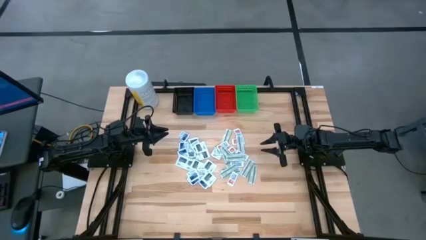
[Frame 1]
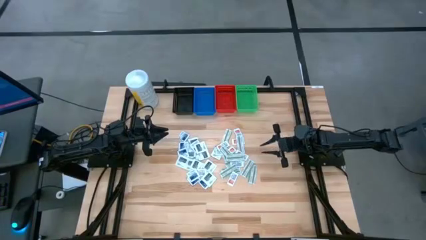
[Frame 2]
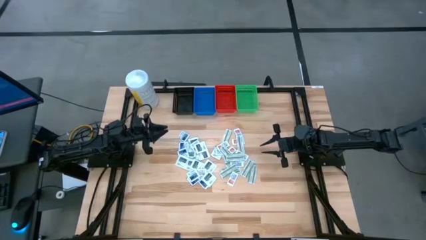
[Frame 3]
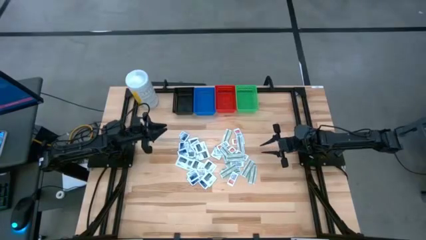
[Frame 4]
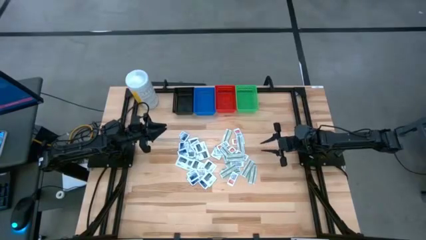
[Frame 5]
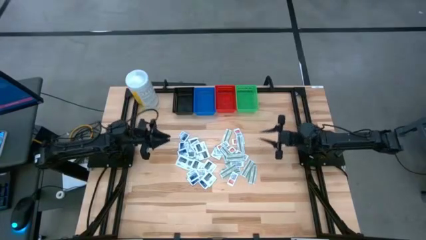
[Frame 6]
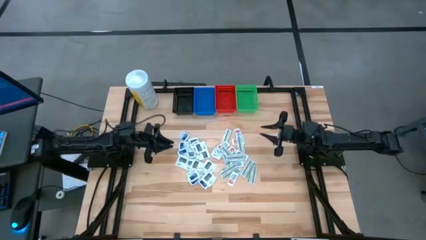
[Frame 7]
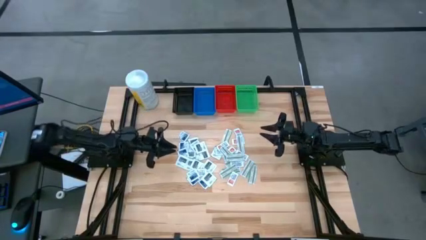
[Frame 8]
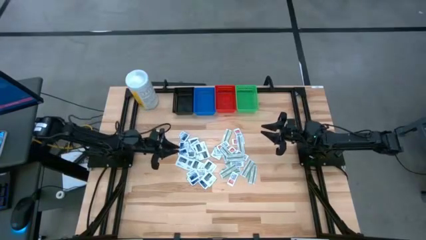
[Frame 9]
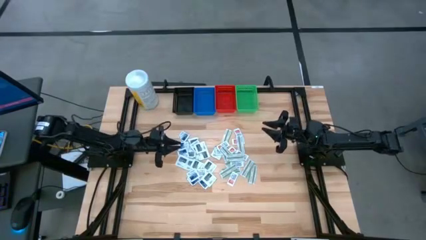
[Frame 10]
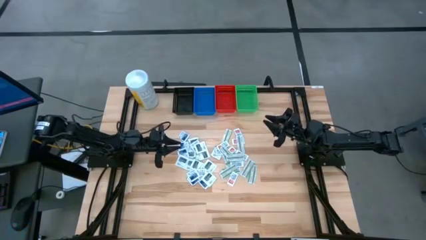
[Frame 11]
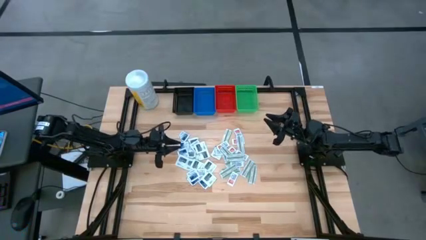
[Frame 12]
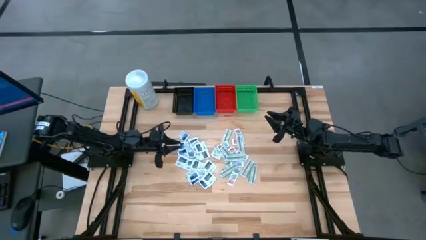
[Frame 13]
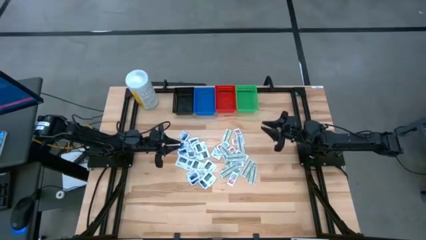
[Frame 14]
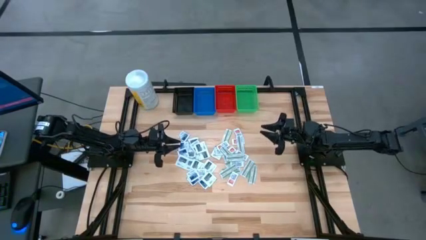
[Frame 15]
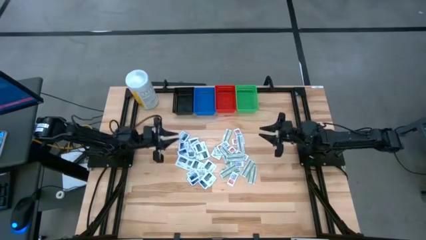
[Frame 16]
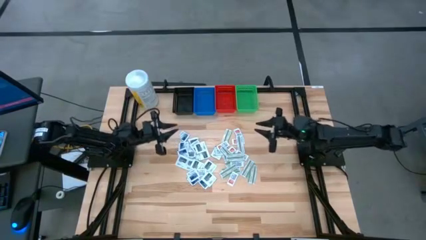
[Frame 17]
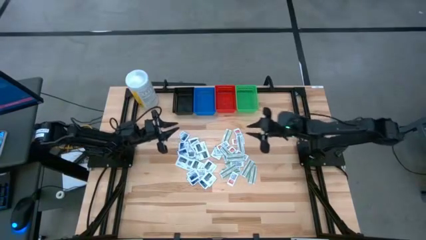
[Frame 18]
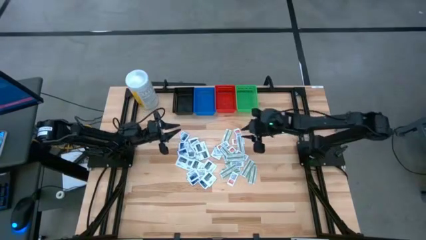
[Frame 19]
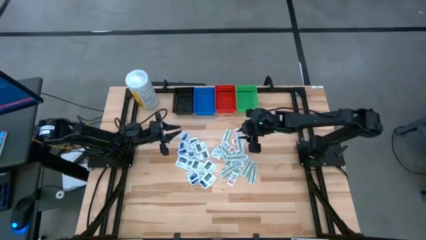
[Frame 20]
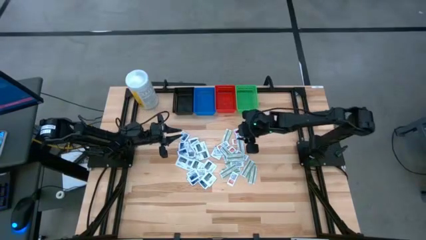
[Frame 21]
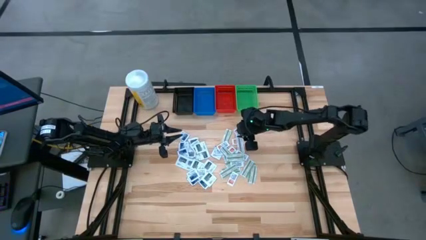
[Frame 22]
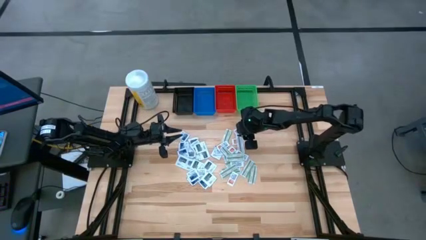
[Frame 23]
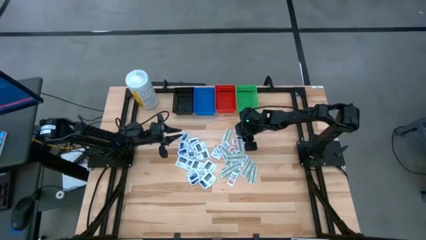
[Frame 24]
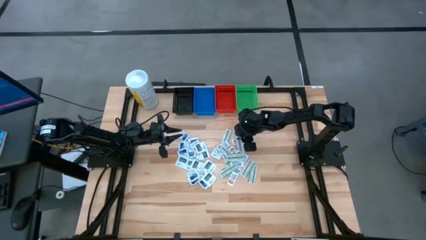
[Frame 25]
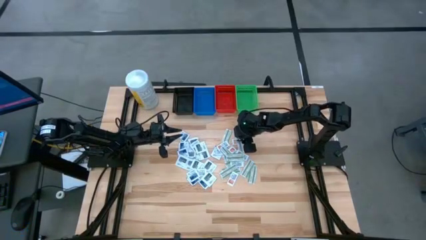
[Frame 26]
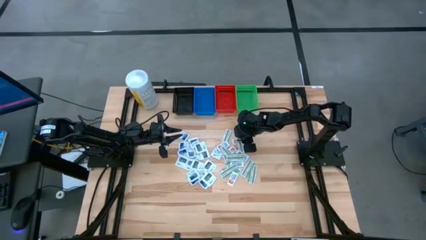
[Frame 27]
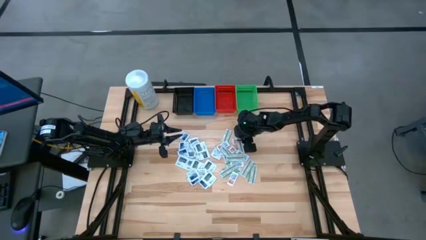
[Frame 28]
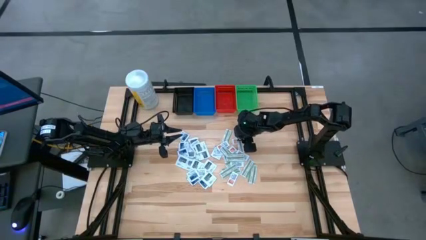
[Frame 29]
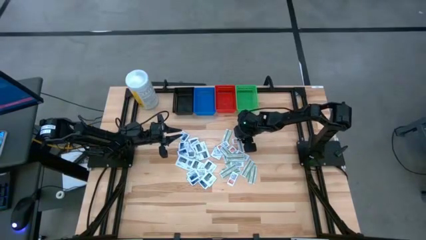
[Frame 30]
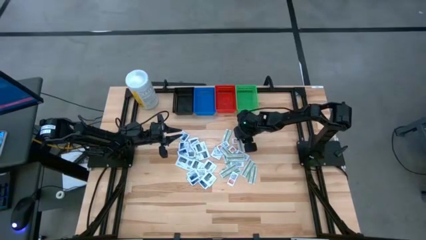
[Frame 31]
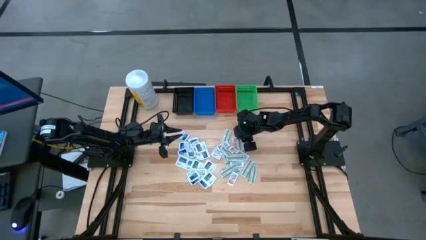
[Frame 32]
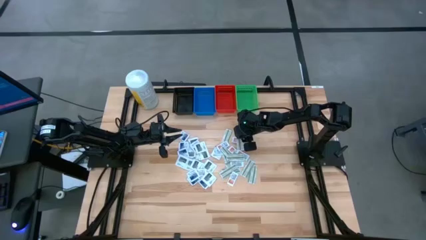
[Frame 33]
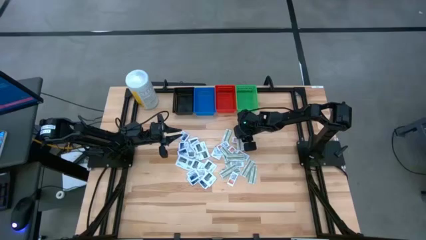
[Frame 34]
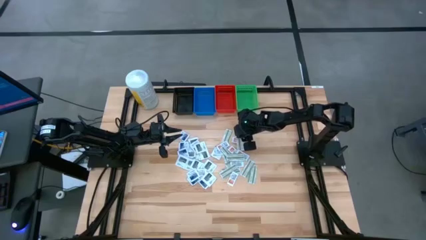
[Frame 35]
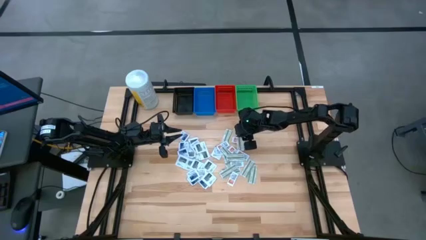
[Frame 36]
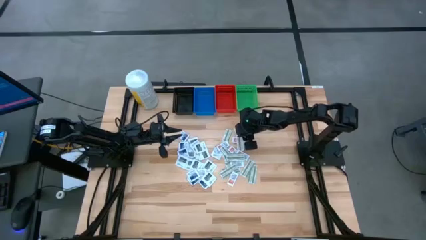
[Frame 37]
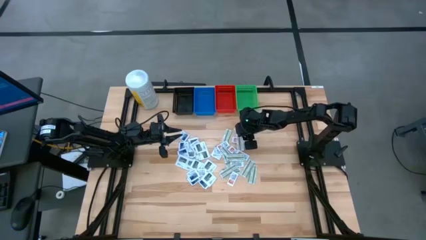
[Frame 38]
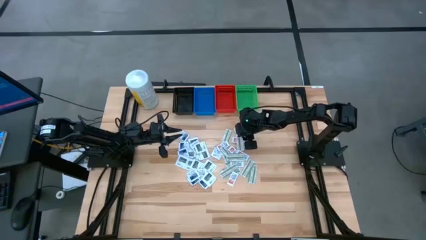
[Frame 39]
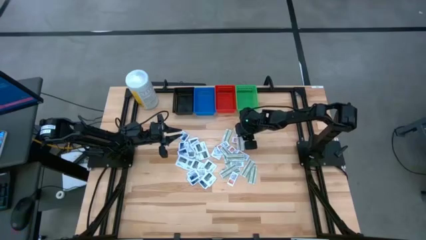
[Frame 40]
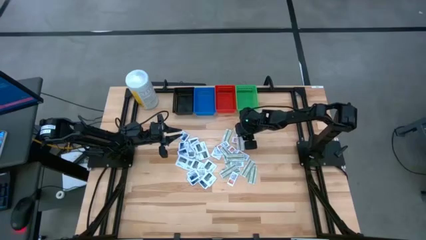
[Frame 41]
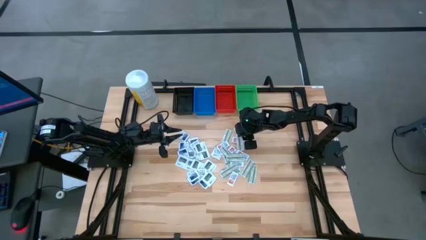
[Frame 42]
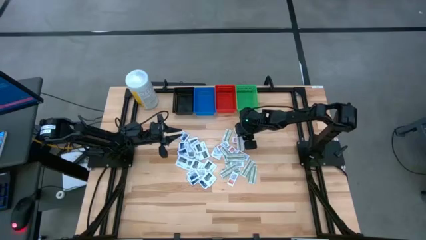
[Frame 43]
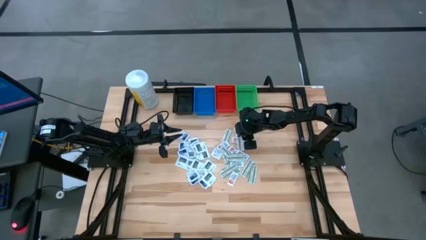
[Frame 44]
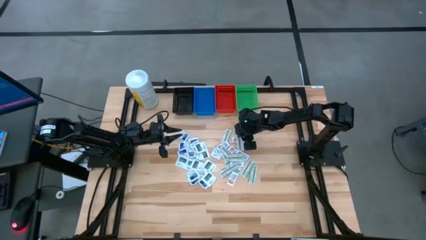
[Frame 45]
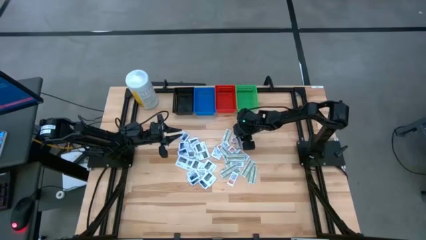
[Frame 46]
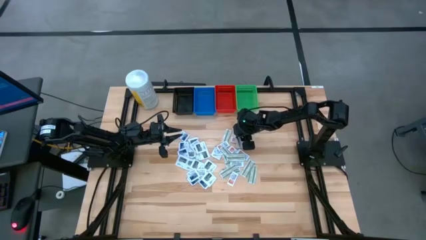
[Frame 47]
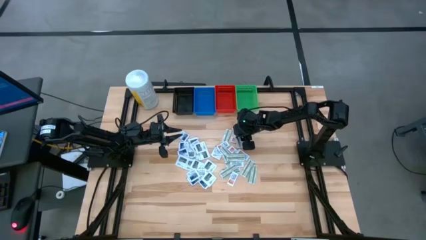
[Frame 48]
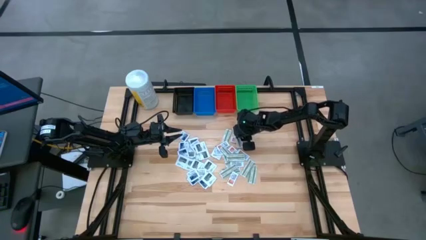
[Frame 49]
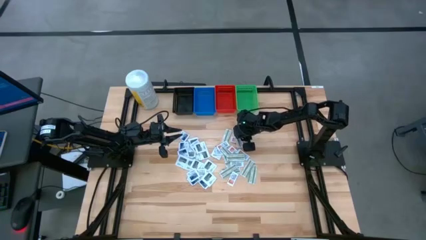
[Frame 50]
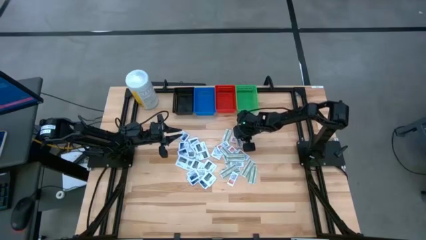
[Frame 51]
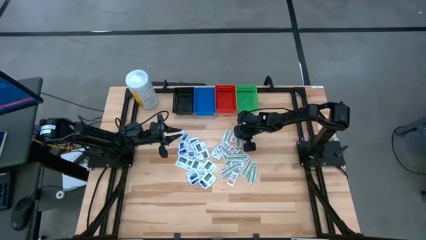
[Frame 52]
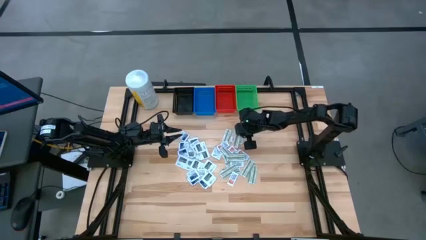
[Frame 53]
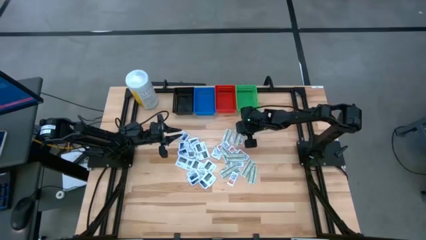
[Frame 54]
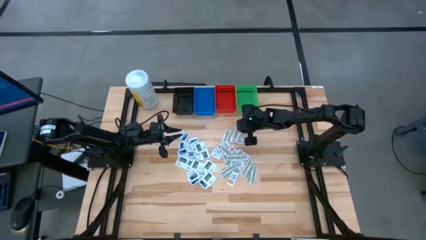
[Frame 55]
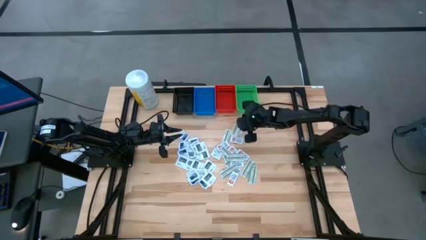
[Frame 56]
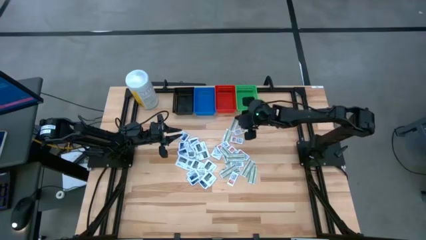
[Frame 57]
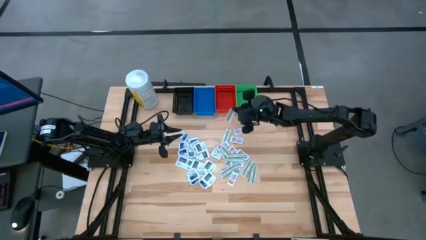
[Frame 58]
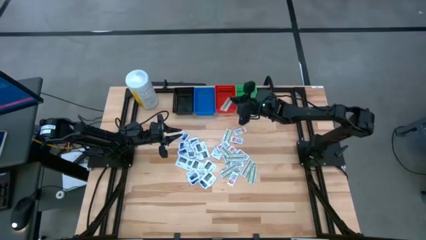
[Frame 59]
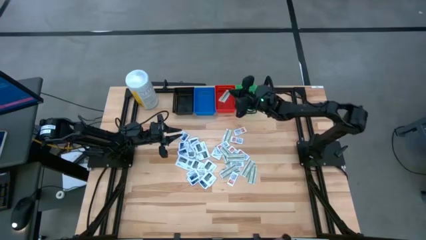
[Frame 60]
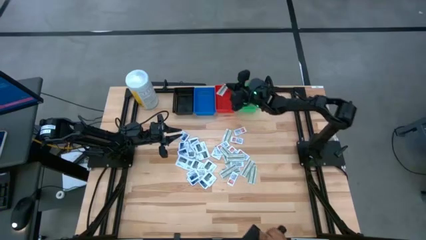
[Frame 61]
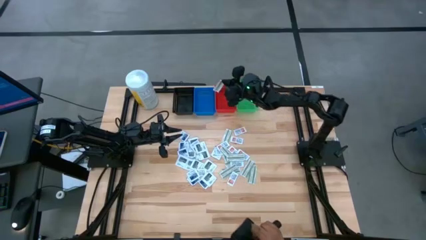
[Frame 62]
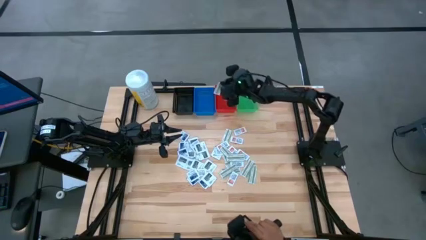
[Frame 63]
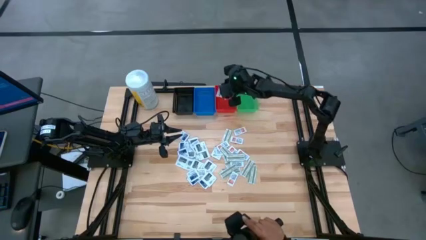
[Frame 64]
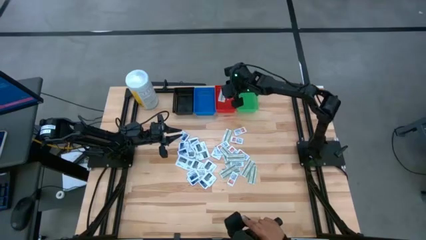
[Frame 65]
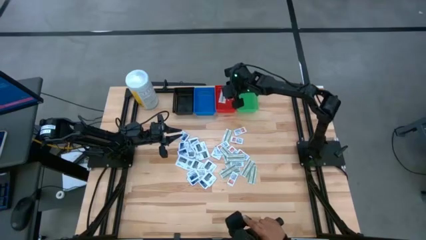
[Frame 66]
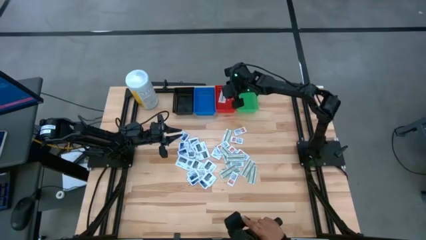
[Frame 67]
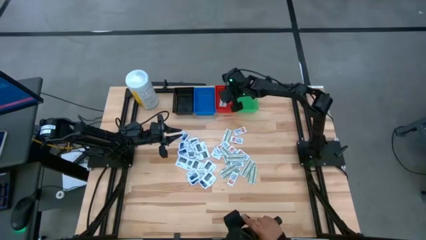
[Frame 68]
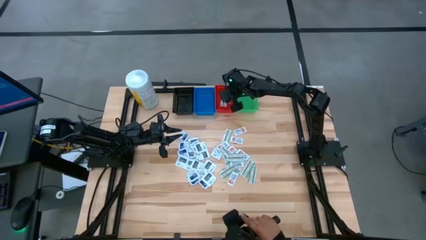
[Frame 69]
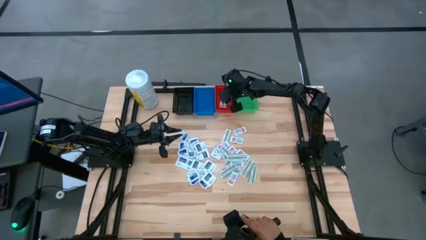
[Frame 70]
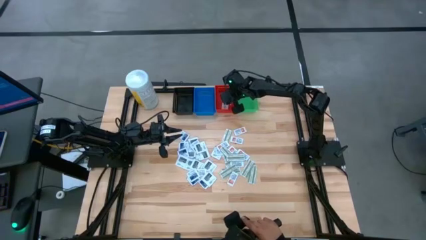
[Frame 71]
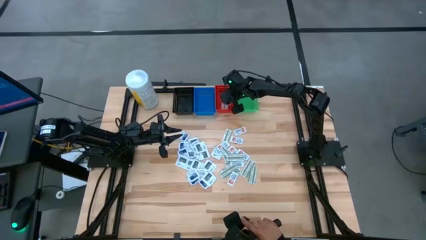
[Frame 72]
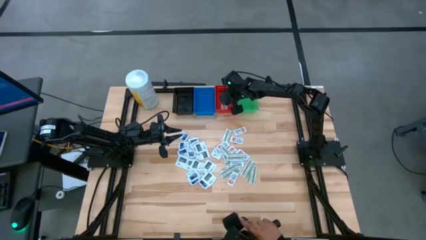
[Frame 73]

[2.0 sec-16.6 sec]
Task: Pick & Place First Aid Supplies
Put the green bandage pack into the red bin
